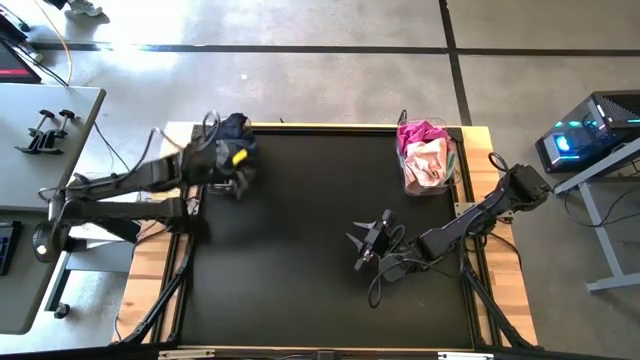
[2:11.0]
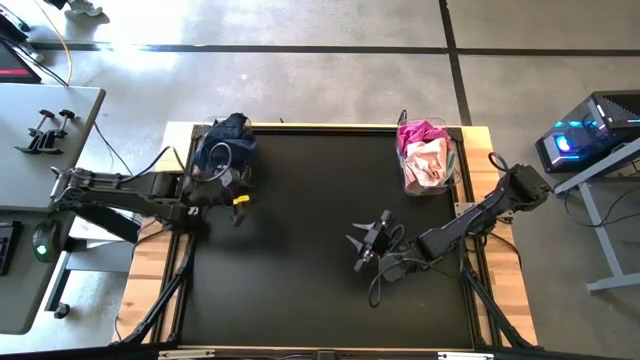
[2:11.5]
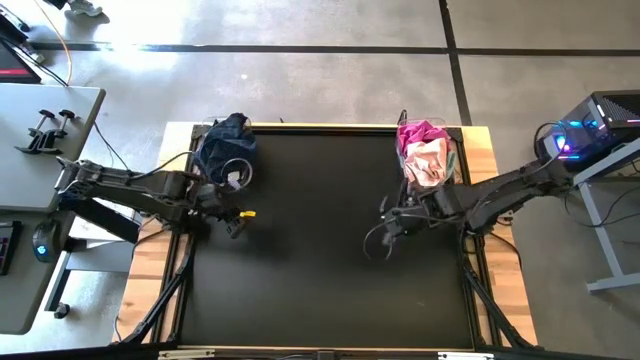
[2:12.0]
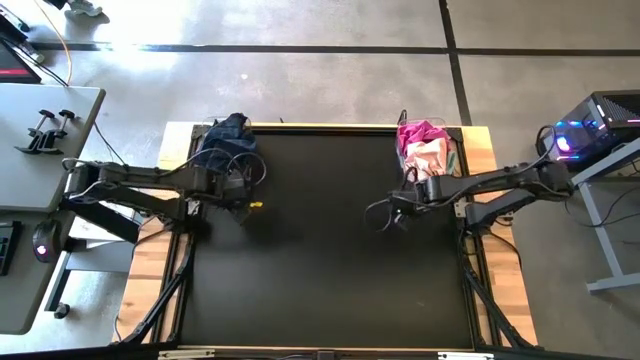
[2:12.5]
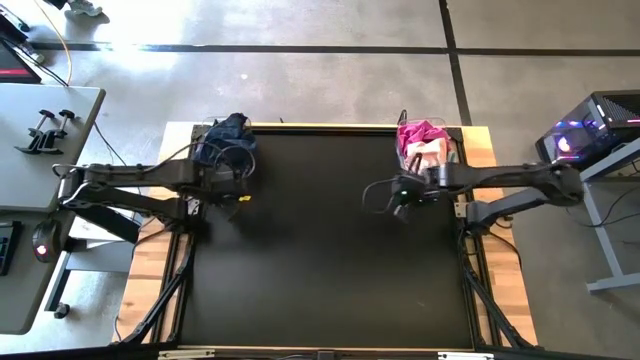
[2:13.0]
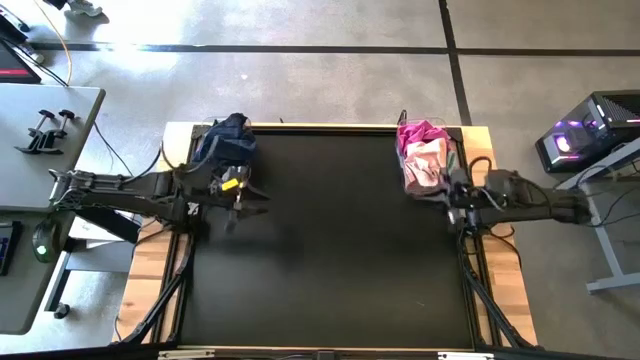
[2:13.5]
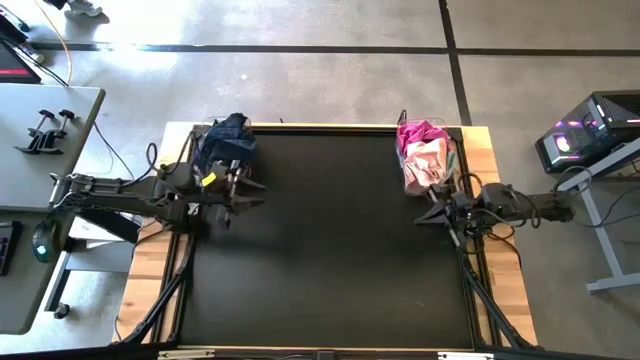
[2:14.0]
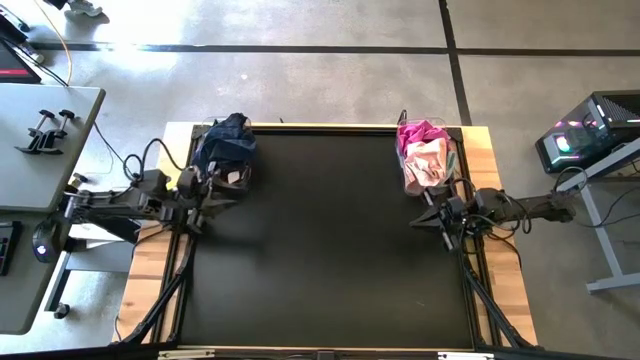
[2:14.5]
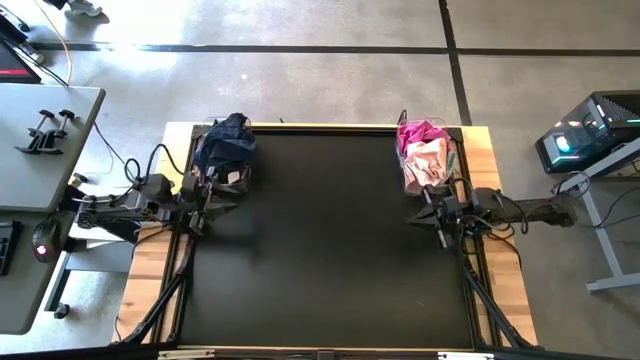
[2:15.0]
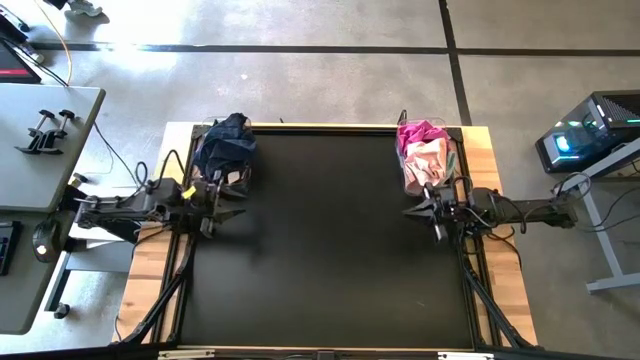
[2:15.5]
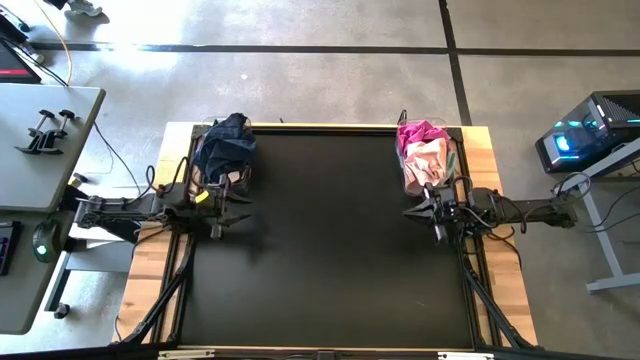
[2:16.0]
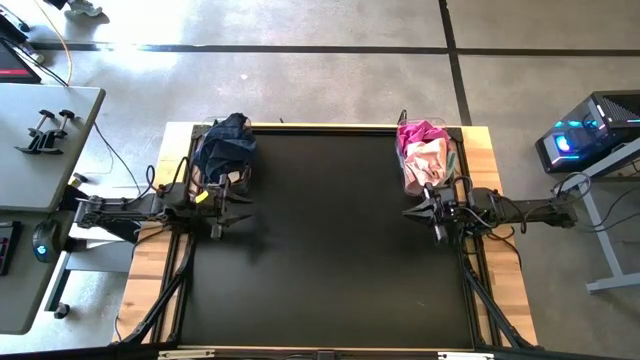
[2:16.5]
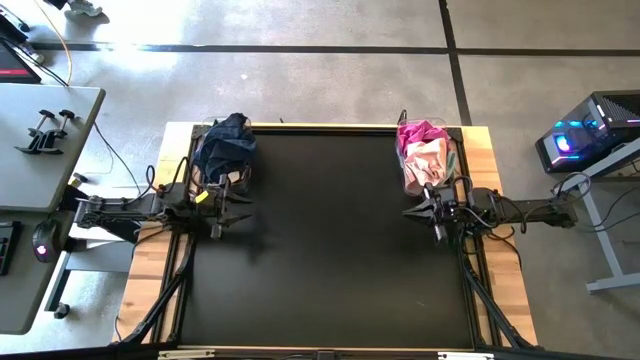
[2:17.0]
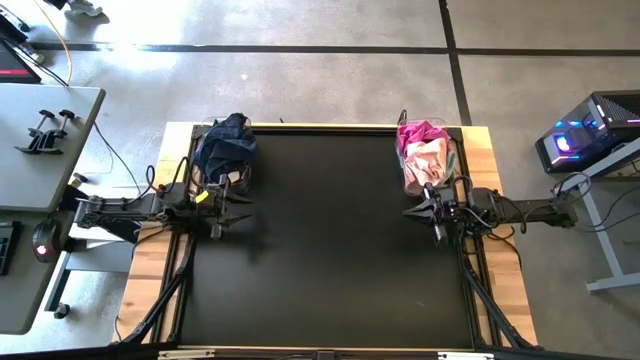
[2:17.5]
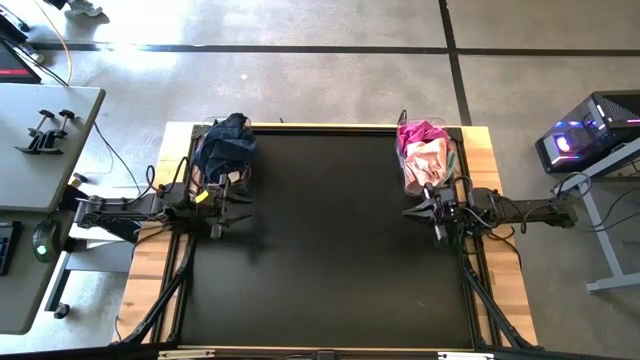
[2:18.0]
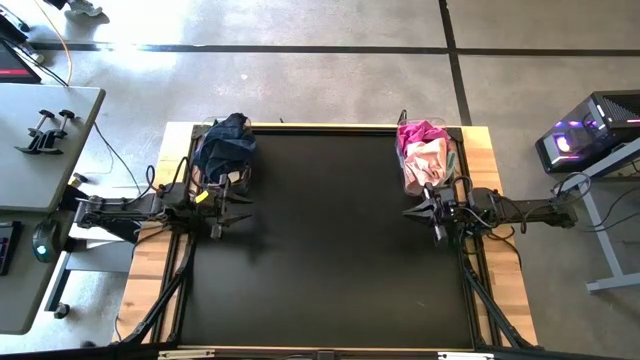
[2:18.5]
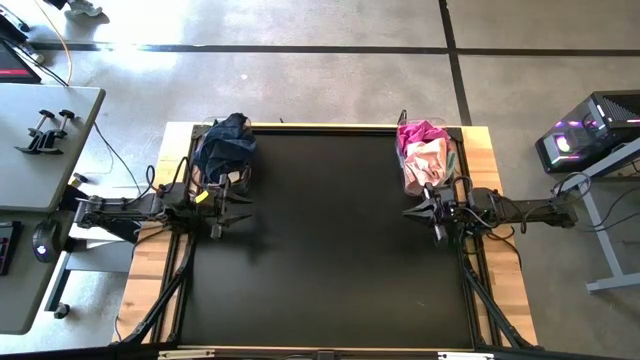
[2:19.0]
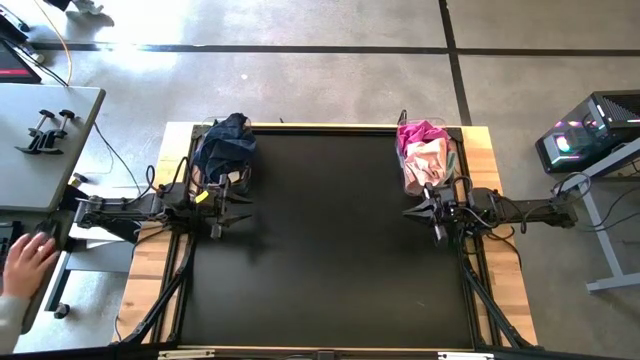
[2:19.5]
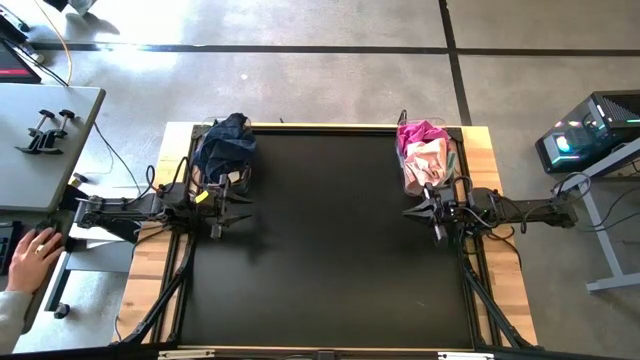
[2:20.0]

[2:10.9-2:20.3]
Task: Sort towels by color in basket
Return to Home Position

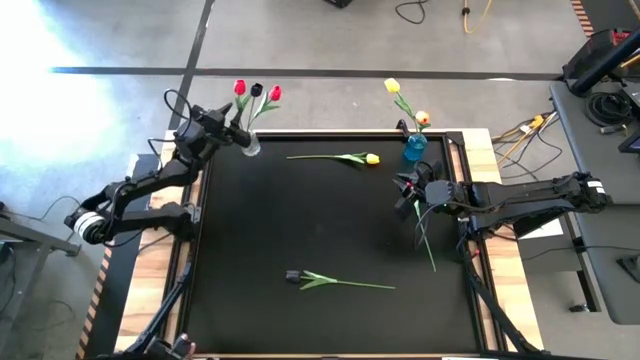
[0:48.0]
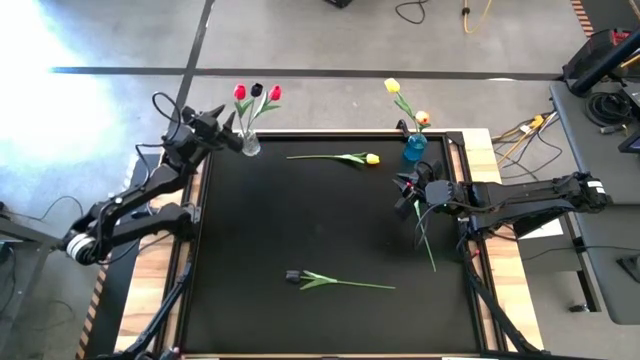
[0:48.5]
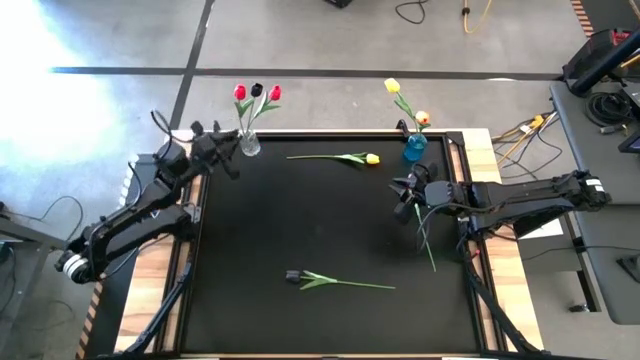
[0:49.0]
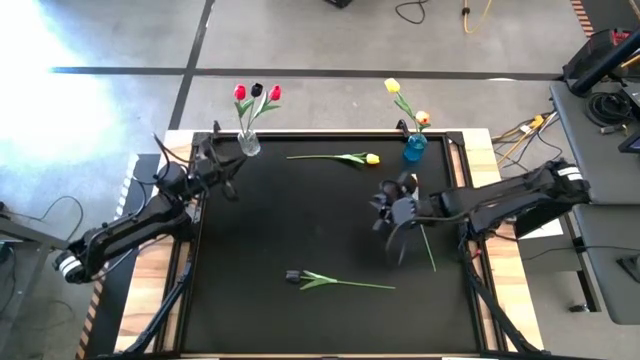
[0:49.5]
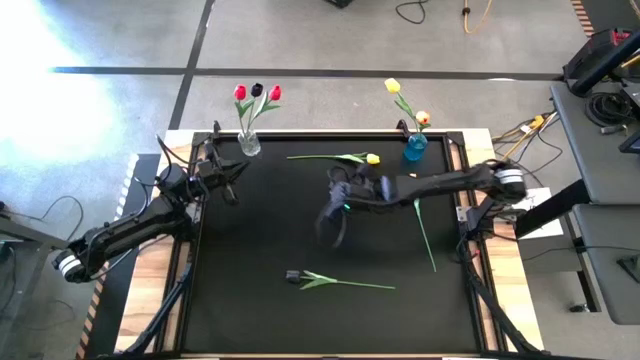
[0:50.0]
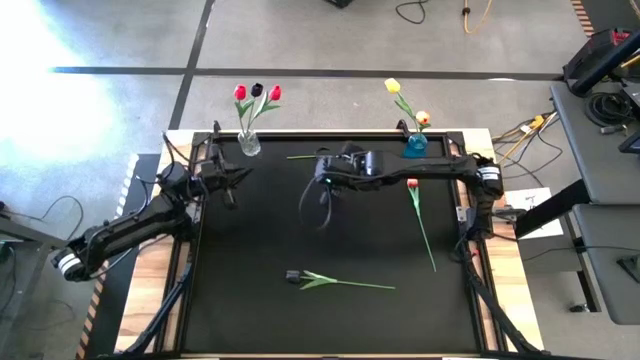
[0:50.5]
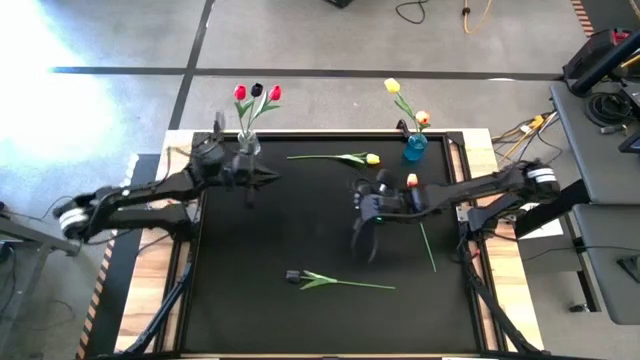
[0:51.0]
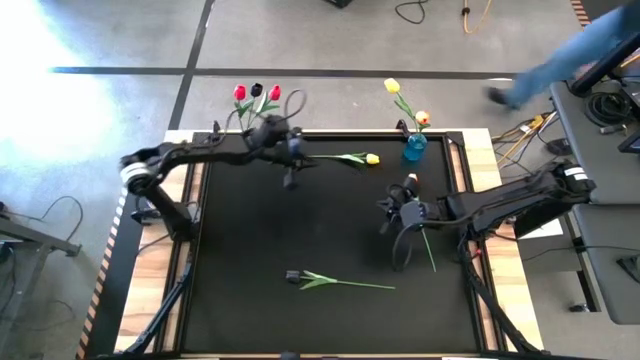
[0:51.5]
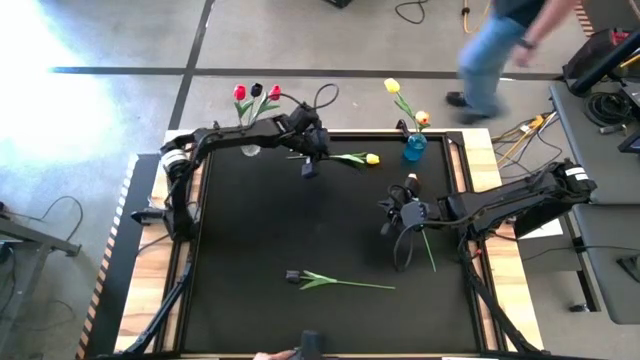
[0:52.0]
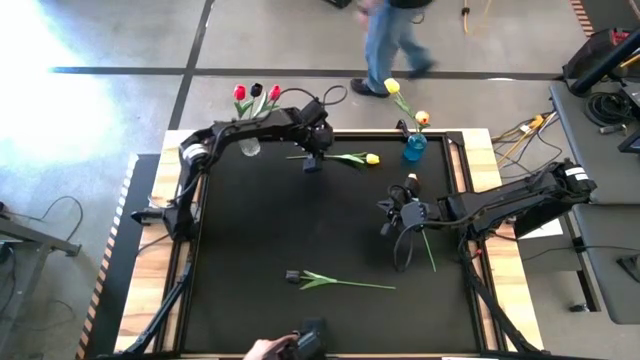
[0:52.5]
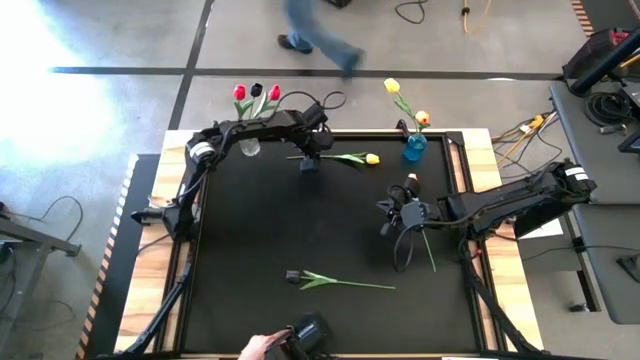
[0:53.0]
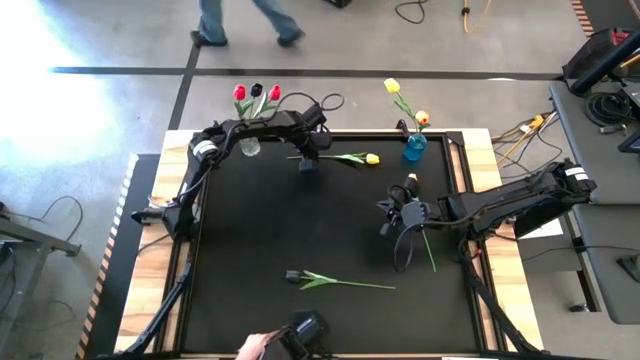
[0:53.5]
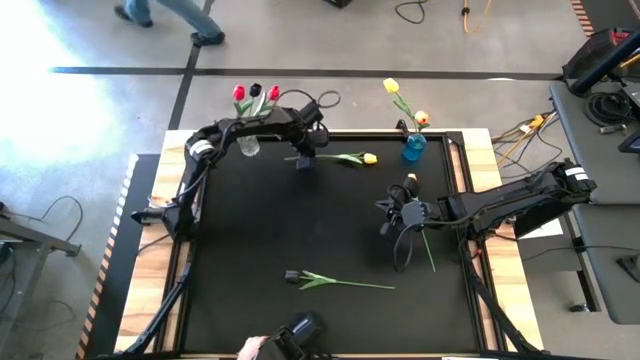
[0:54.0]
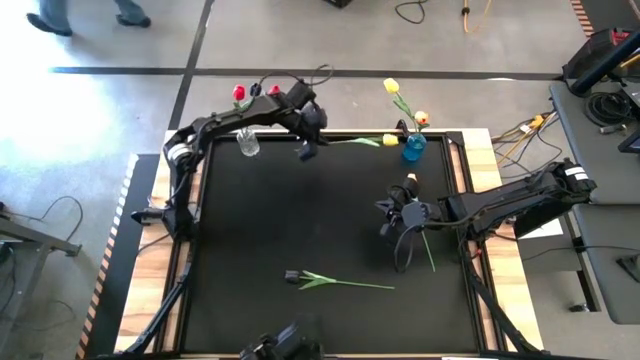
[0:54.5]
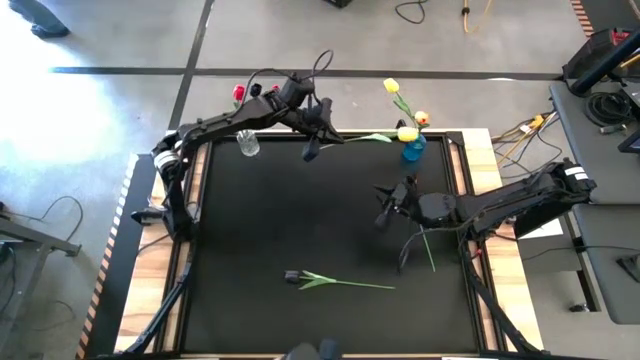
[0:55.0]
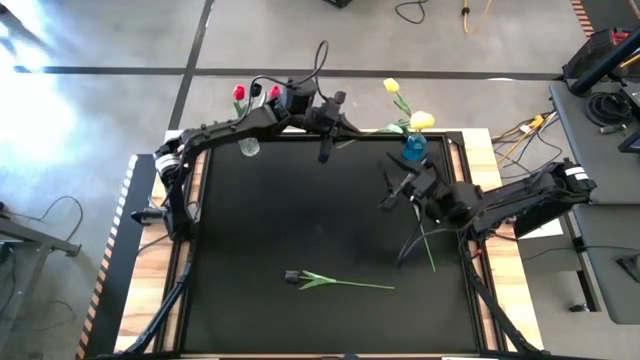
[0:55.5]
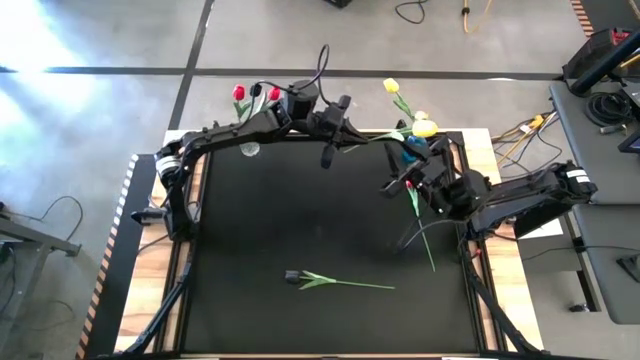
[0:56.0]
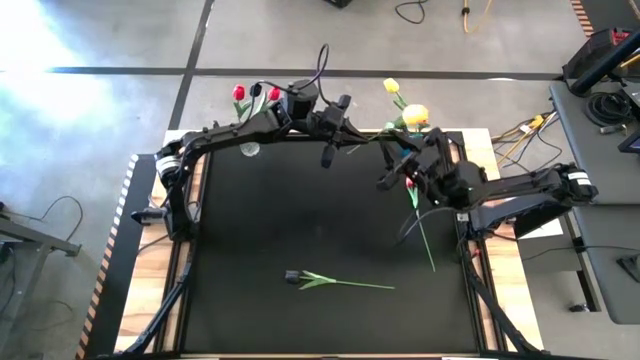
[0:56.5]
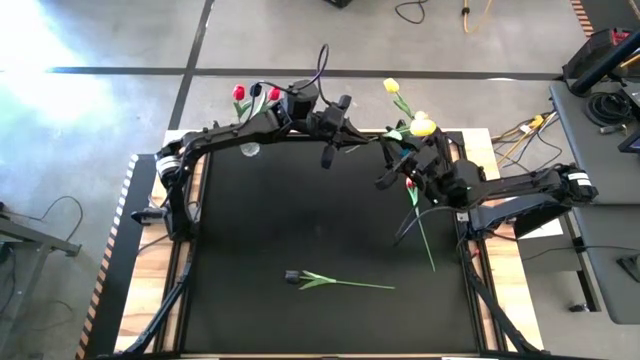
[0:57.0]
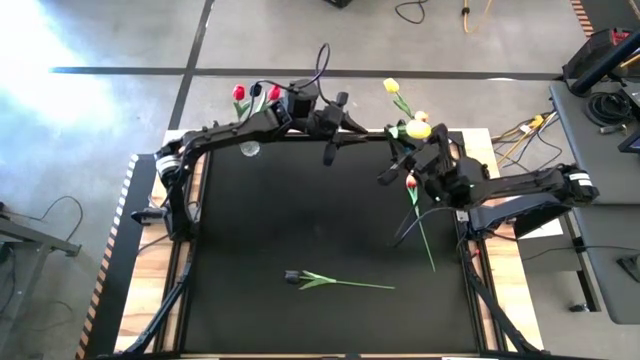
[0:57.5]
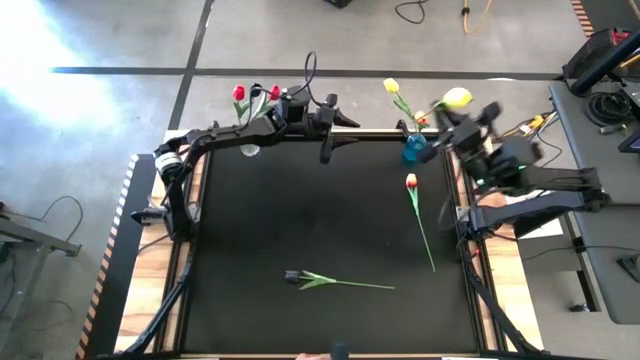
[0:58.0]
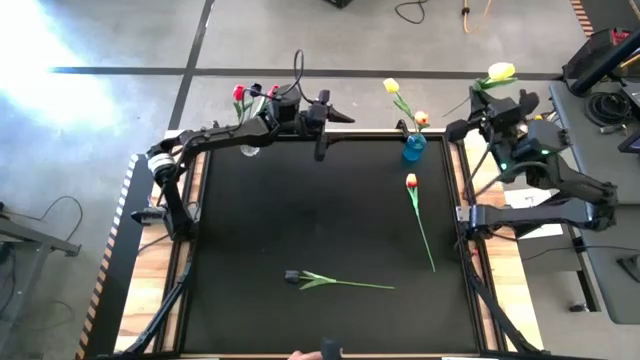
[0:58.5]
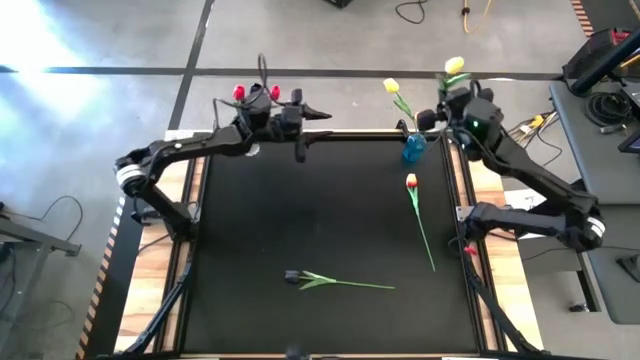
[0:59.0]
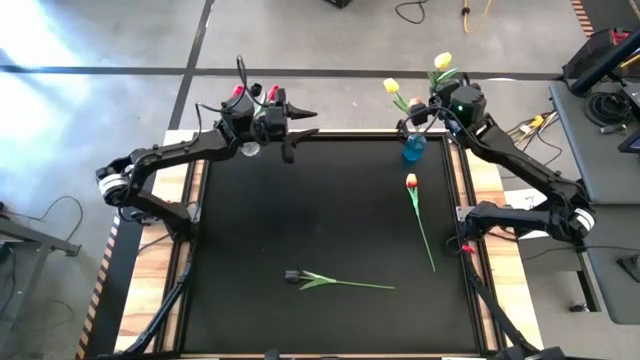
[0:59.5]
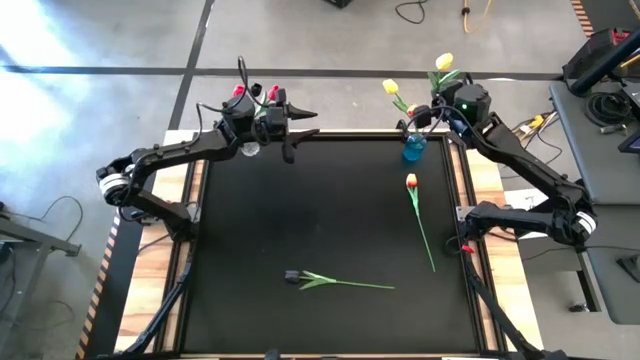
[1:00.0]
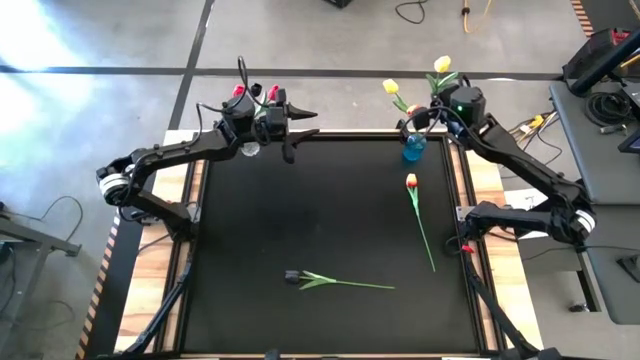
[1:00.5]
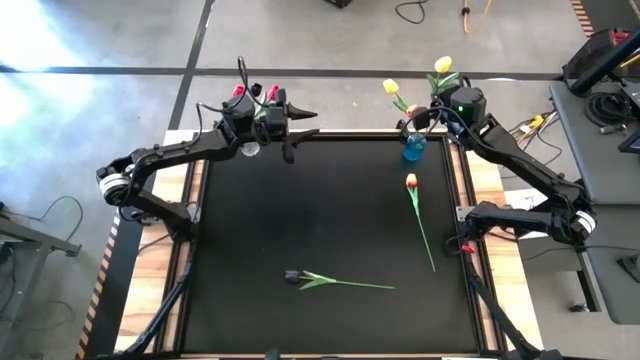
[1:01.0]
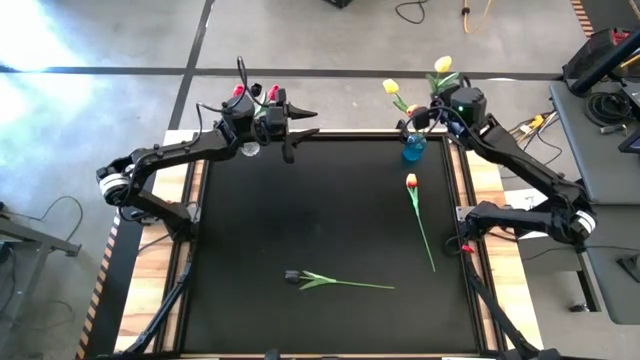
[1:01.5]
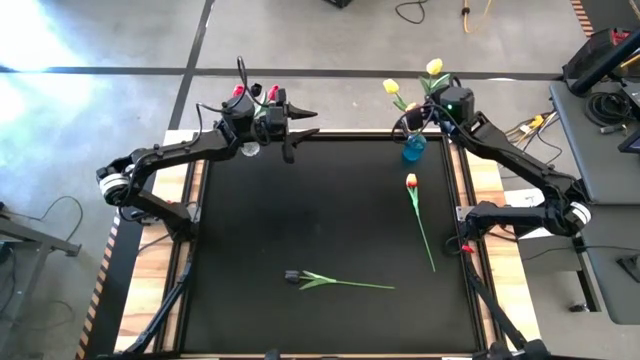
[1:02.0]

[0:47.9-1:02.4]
Task: Sort flowers into vase by color
Put the yellow tulip into the blue flower vase
